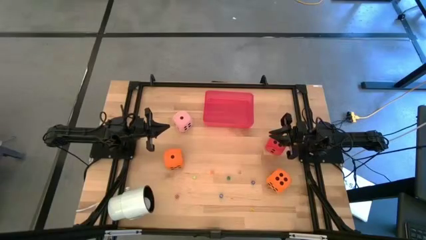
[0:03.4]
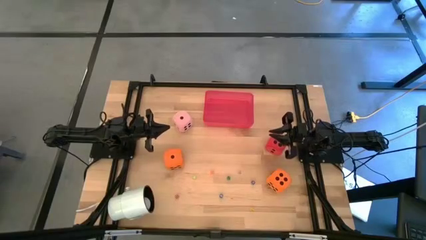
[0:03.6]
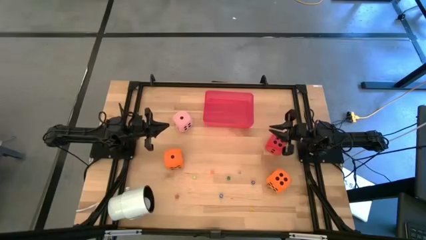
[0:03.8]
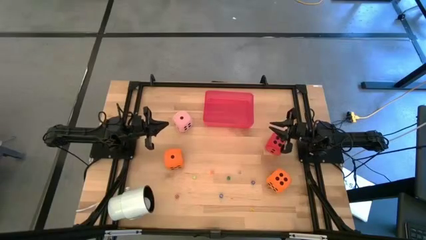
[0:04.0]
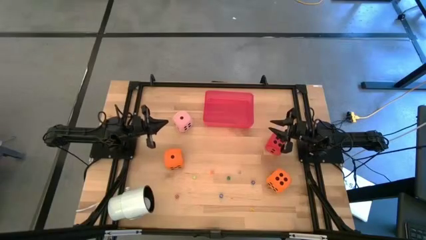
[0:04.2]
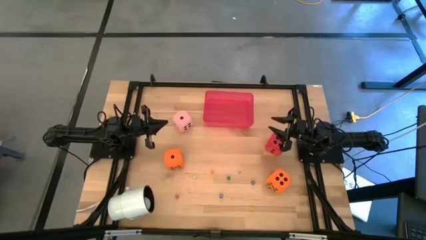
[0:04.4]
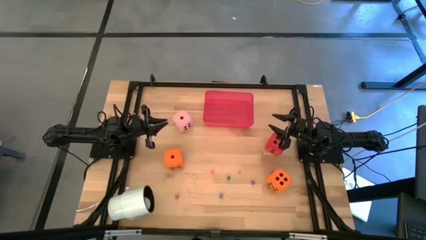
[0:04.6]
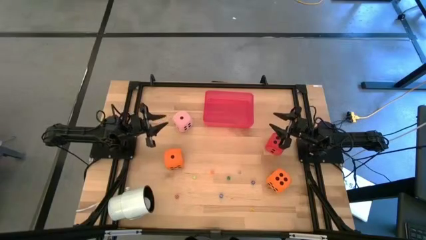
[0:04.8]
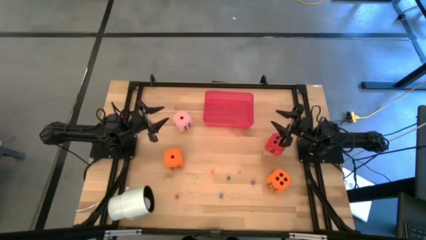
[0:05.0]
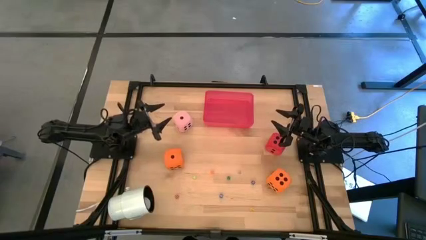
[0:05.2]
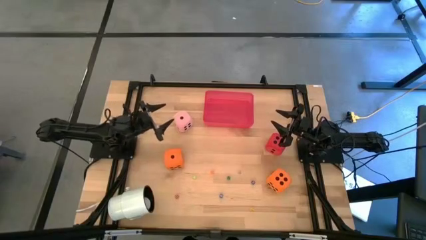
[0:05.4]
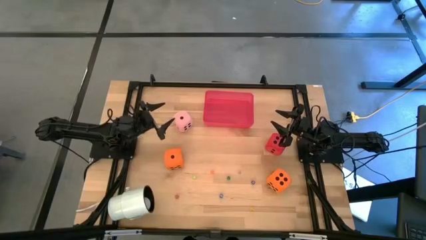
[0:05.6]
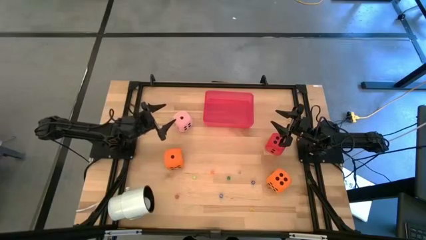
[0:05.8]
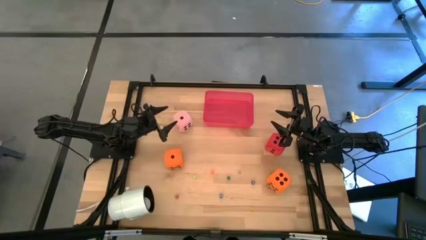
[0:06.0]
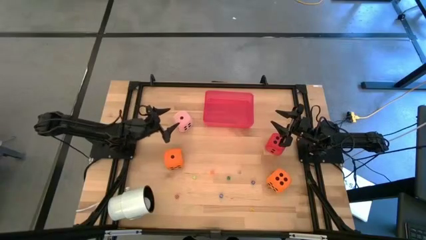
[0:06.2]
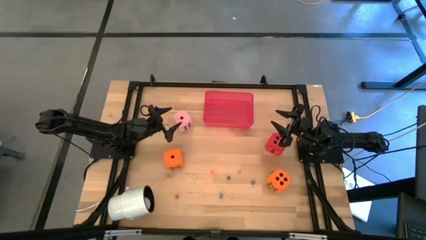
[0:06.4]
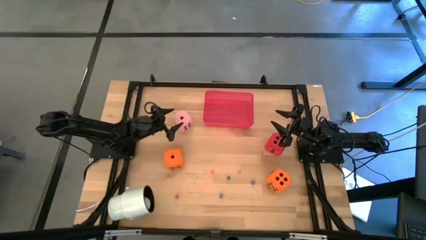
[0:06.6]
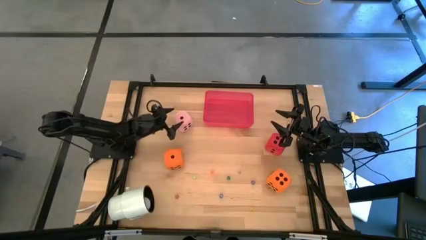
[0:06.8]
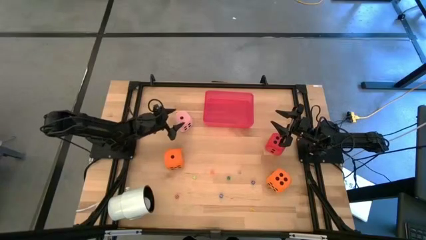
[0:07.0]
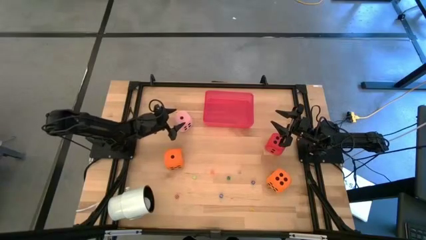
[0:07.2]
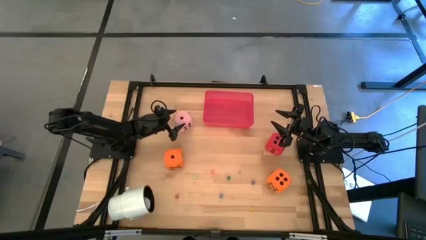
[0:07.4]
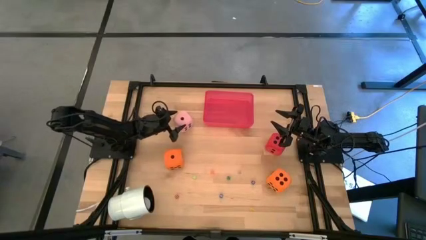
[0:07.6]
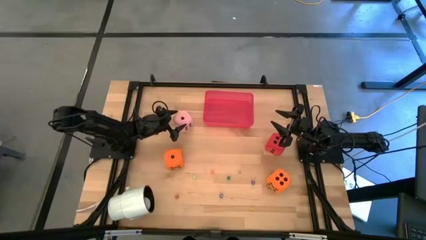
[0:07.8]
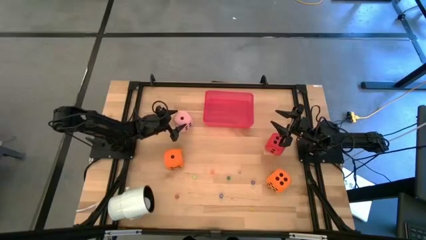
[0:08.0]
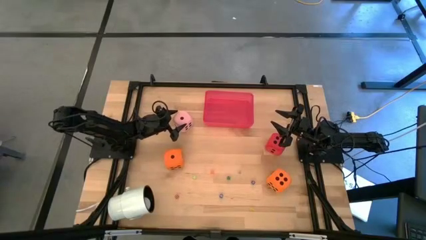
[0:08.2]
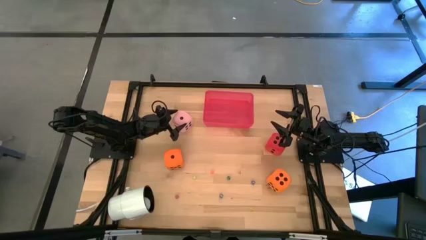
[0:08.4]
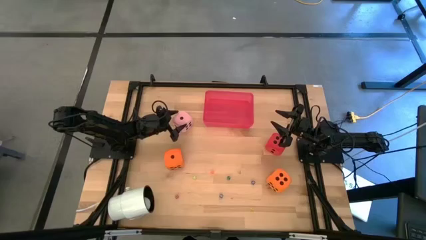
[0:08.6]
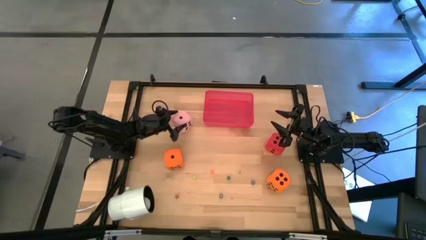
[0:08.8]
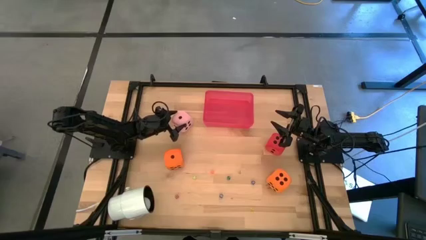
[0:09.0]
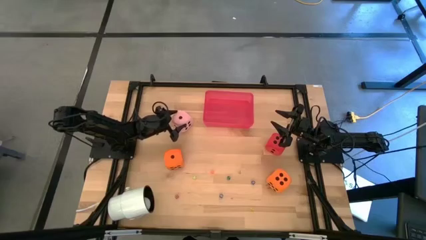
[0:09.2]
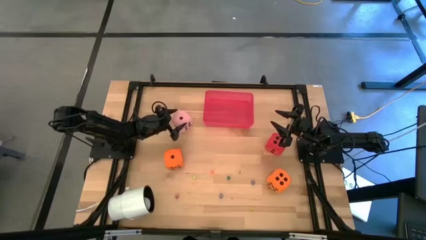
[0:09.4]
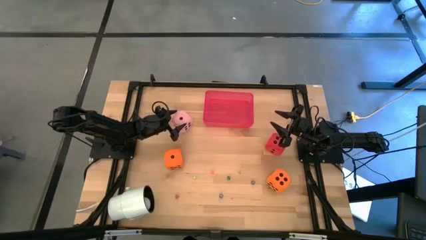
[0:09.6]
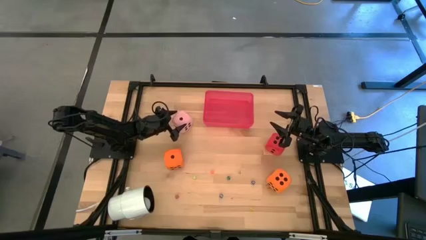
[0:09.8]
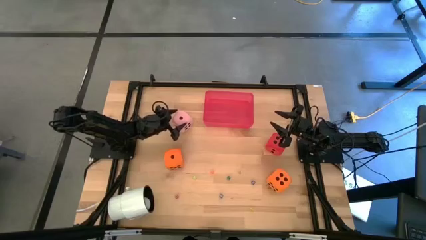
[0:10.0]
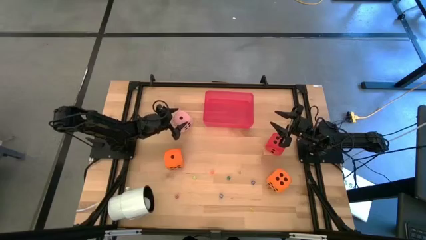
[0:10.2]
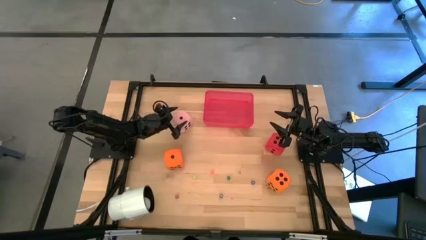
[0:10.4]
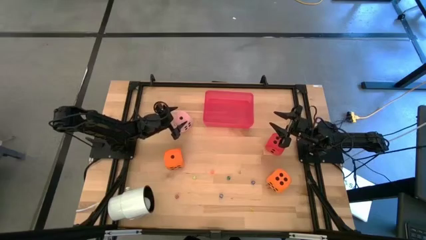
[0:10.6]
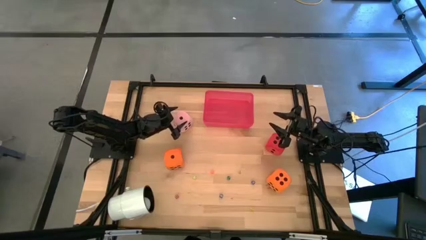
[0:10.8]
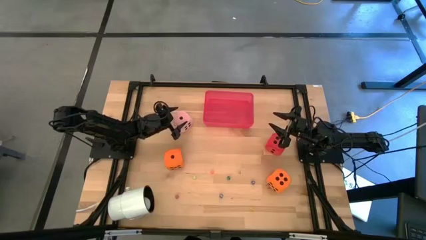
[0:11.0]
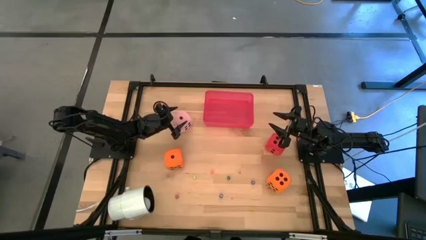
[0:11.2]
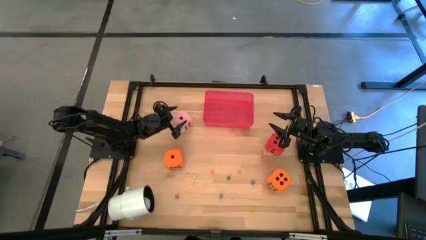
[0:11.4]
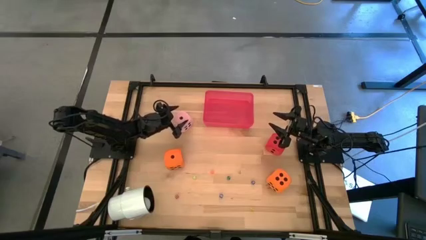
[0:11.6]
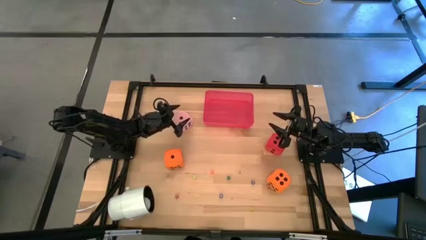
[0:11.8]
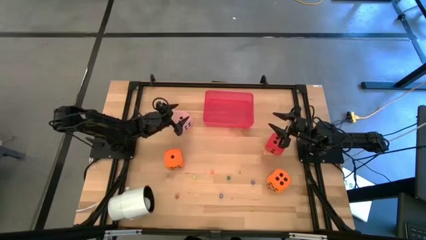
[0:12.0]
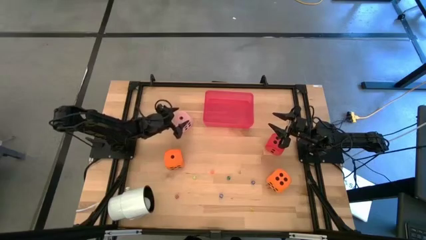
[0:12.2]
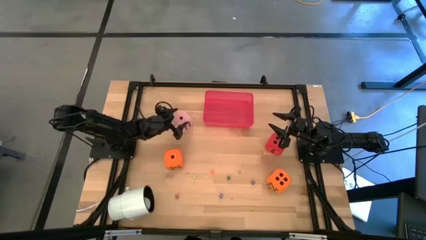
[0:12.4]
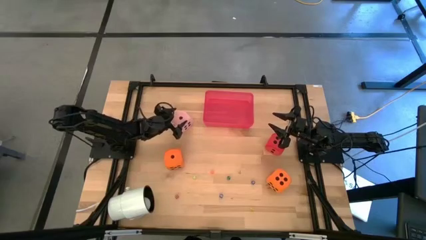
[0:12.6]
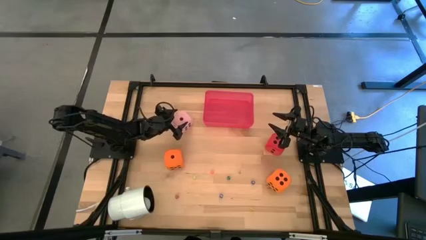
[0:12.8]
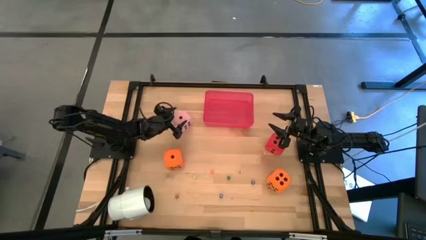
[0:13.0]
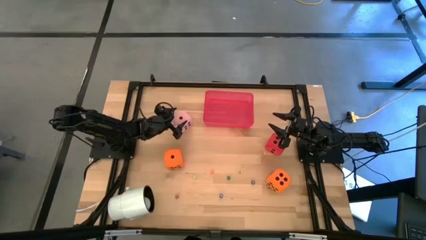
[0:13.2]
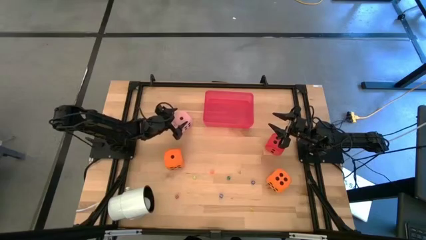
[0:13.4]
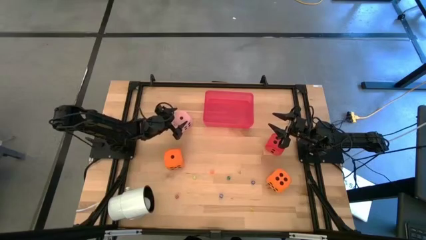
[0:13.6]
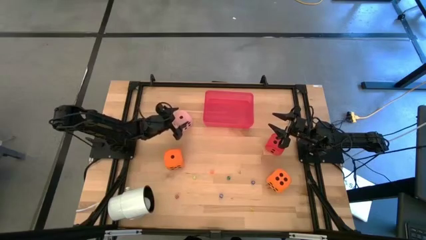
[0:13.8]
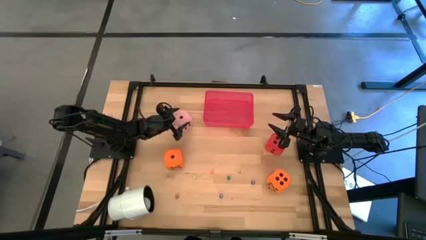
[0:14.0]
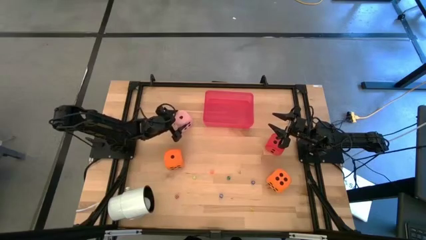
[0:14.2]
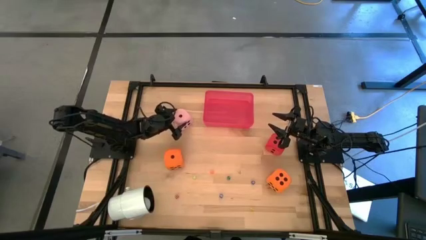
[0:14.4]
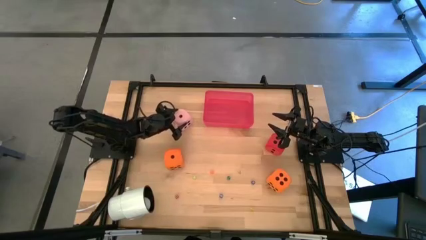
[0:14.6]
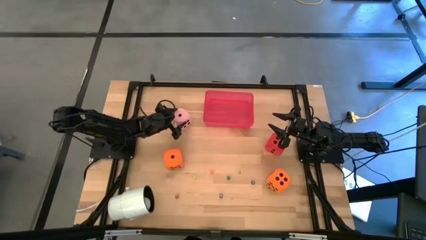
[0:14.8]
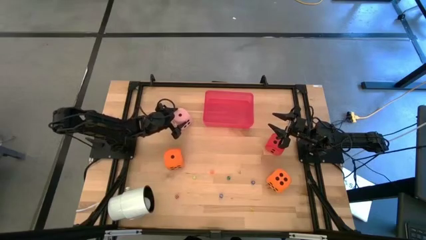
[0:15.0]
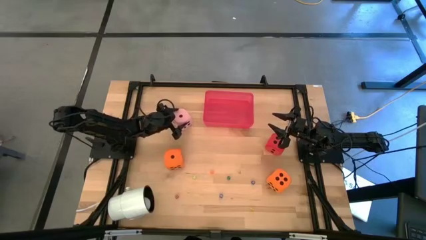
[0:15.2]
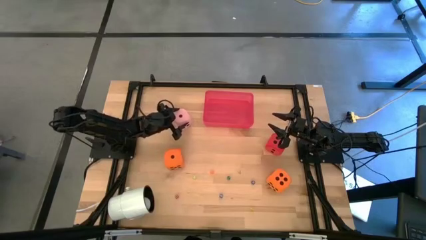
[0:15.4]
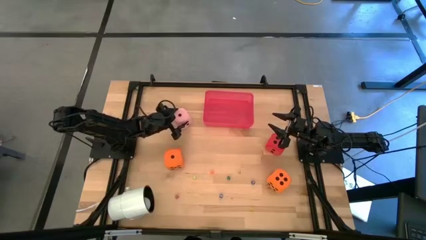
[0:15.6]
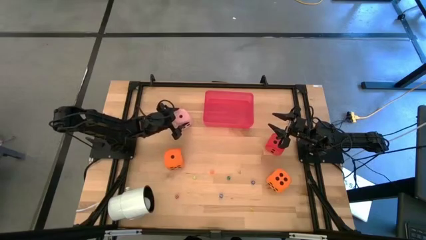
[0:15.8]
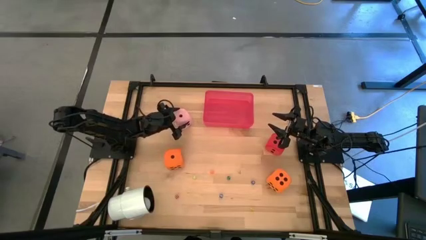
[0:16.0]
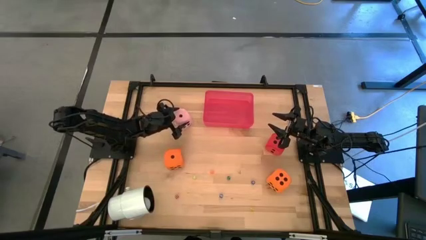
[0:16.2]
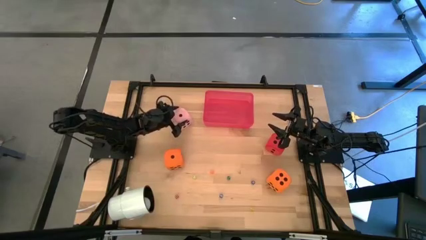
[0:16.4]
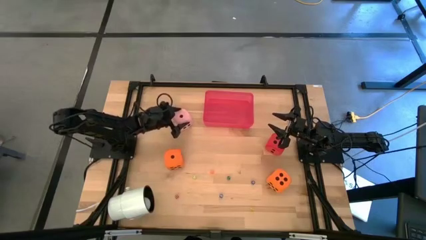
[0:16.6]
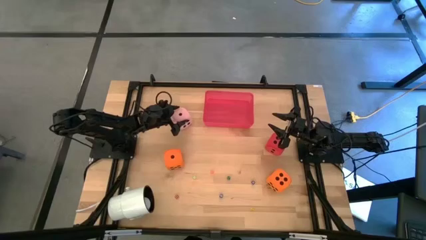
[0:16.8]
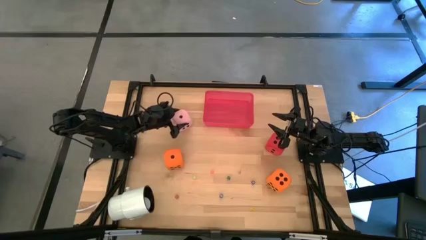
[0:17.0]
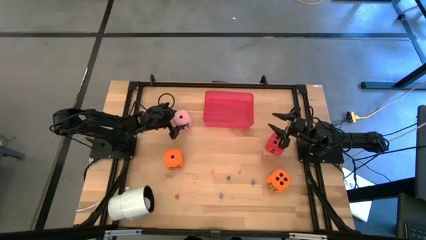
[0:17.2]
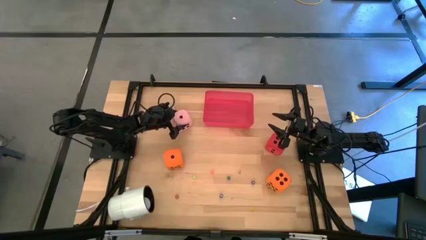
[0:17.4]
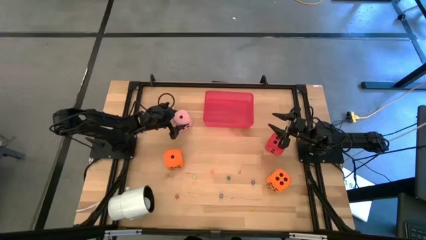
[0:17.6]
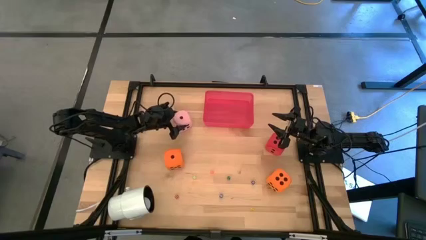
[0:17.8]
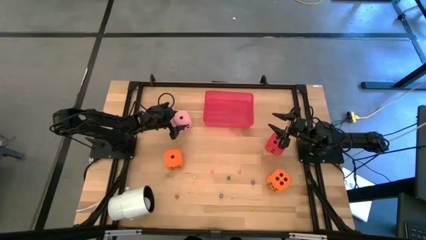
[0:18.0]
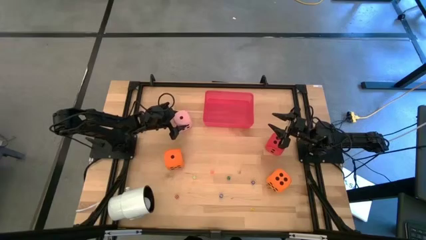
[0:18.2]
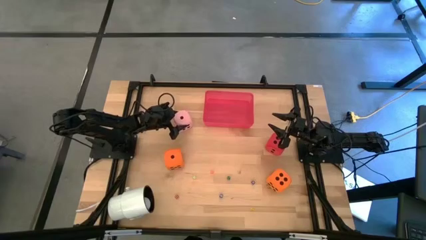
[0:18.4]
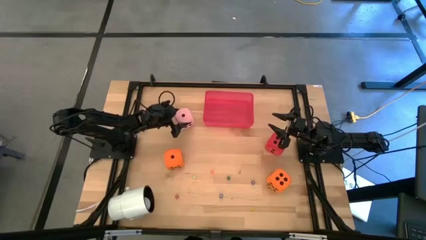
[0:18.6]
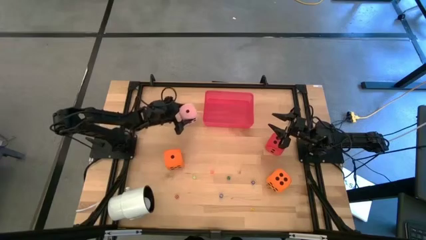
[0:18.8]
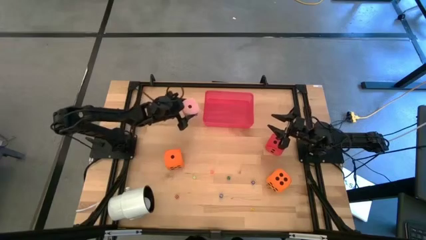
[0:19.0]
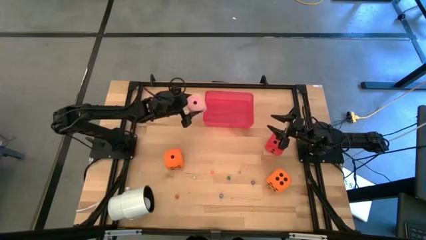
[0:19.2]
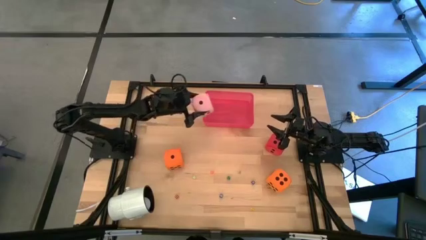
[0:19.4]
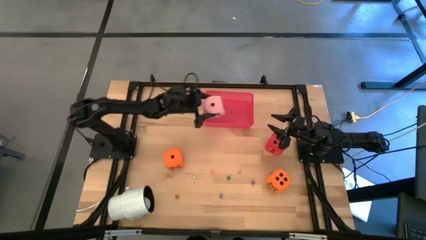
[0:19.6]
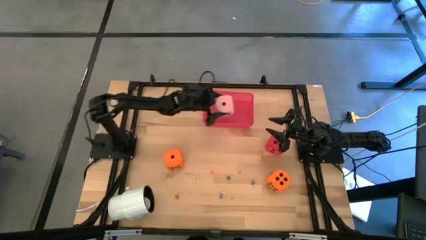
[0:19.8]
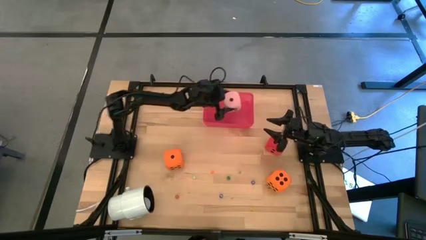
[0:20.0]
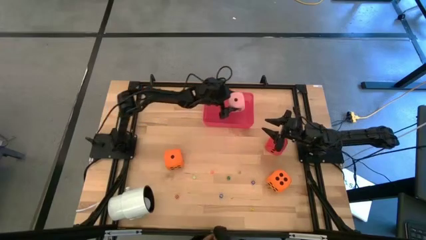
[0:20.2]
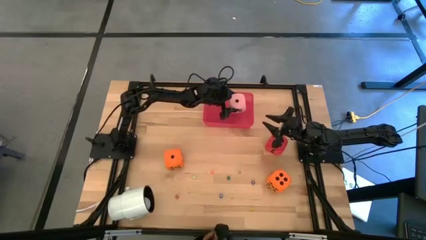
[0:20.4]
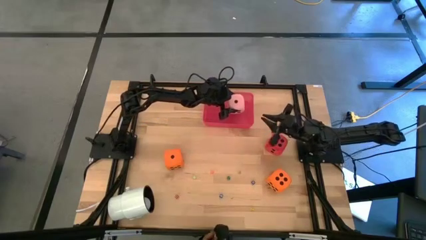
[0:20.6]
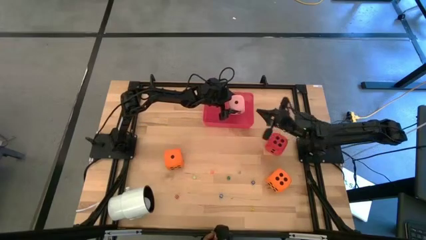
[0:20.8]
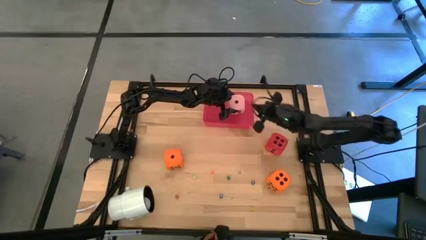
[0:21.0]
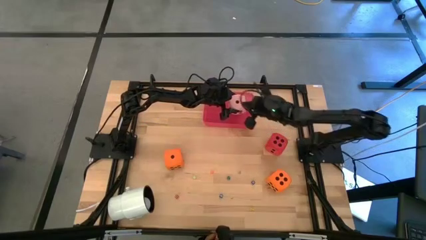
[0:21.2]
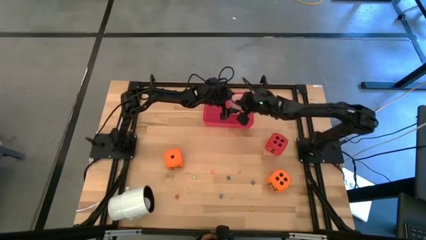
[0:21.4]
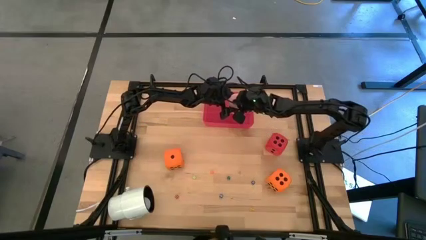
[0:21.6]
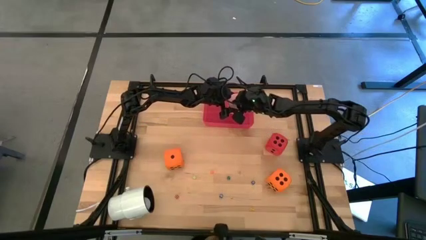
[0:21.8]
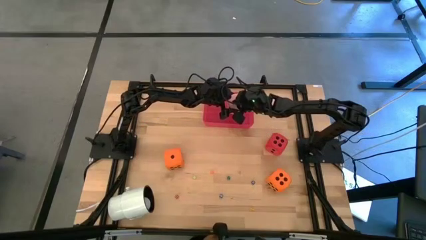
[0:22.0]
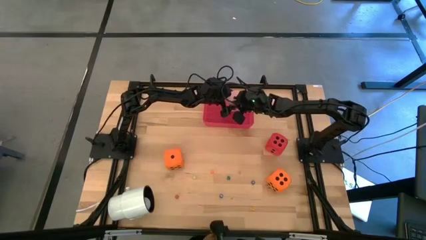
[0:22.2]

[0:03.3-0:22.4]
Task: Pick & Place Dice
Put the large pink dice into the red container
